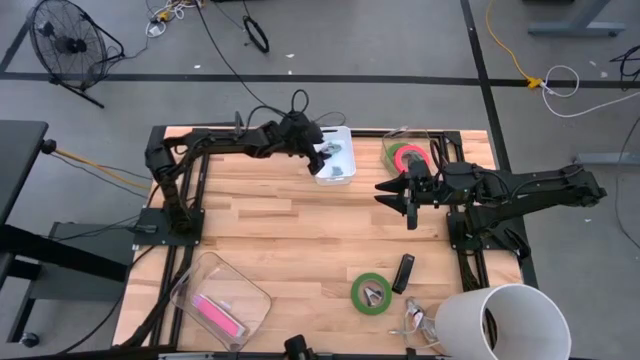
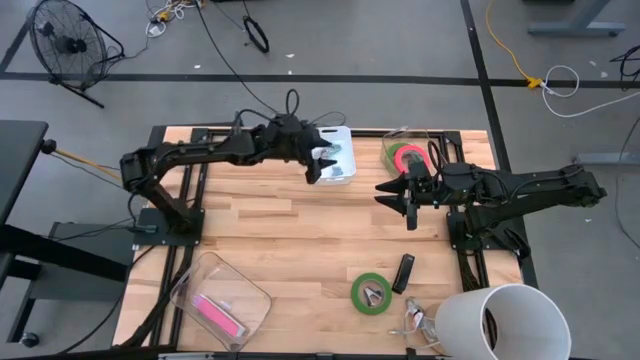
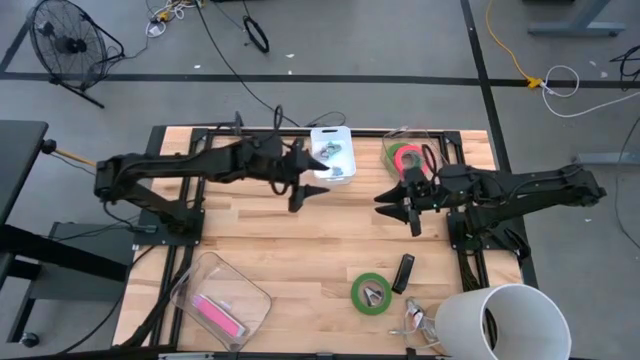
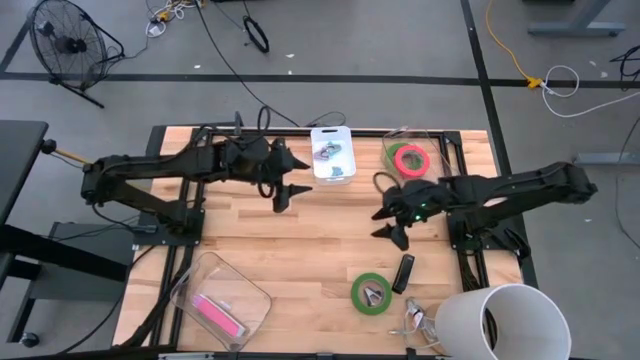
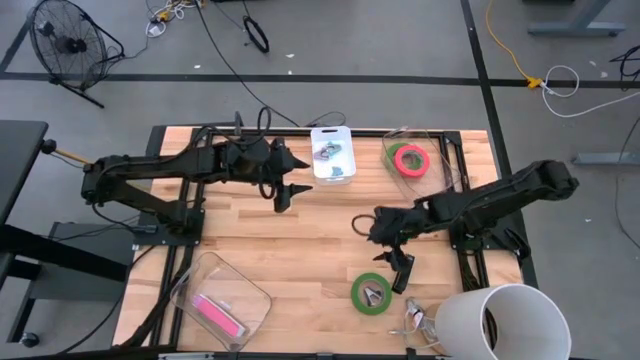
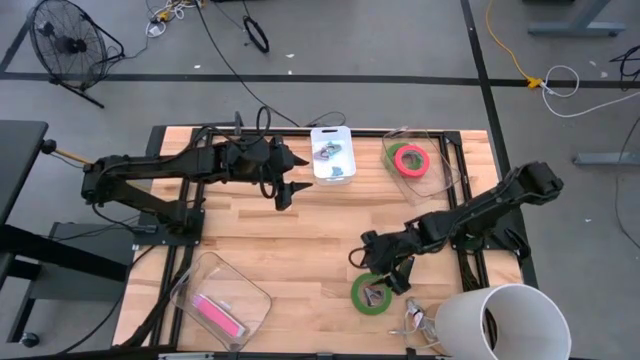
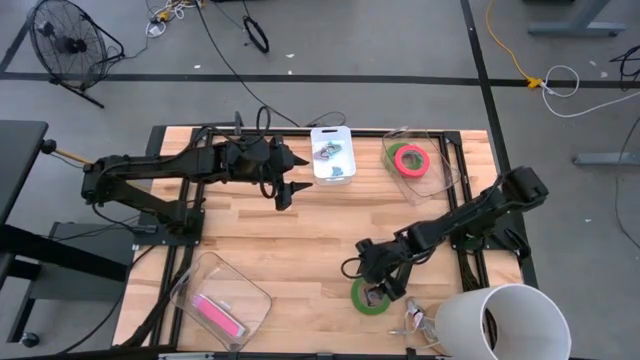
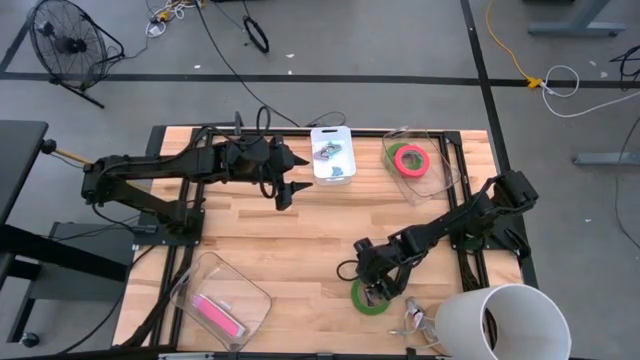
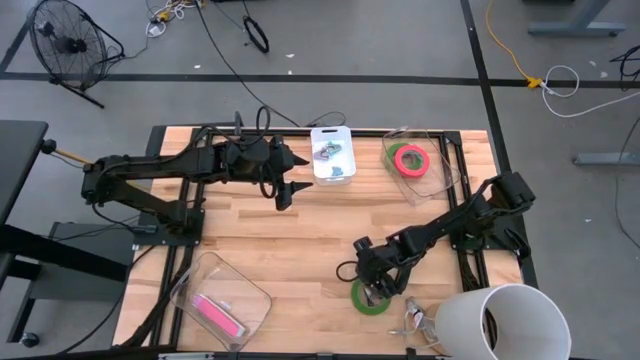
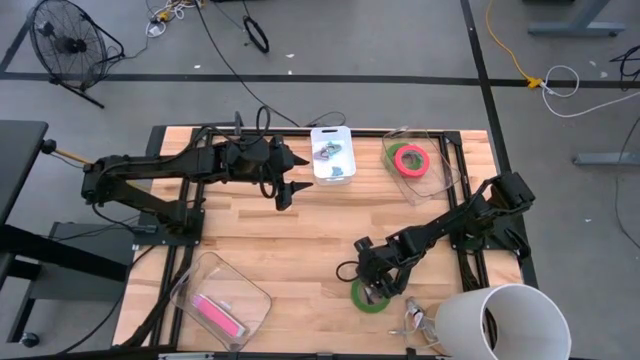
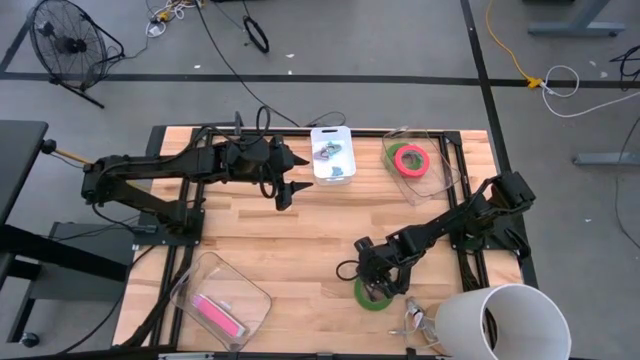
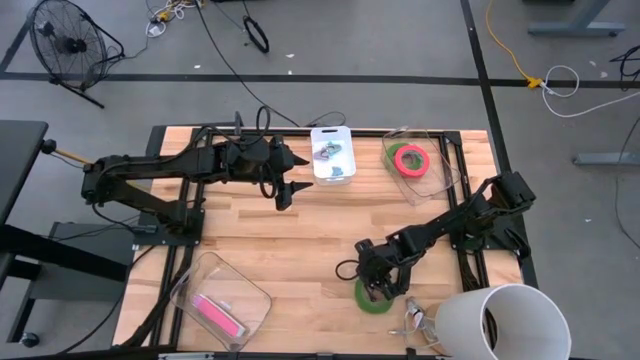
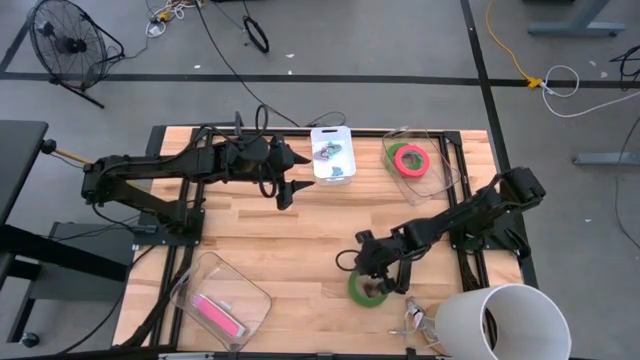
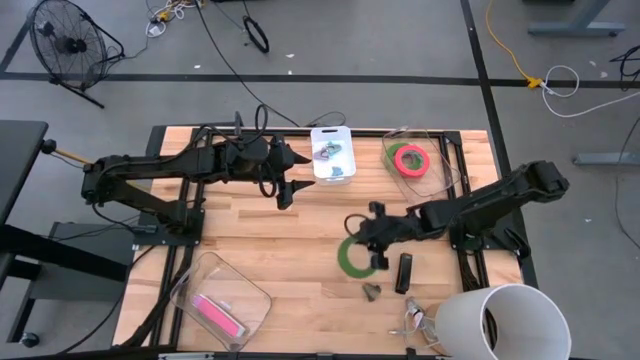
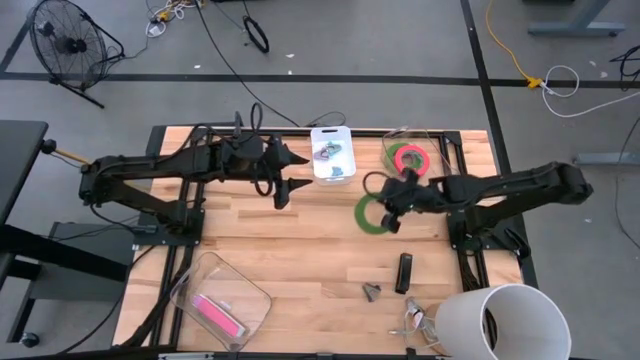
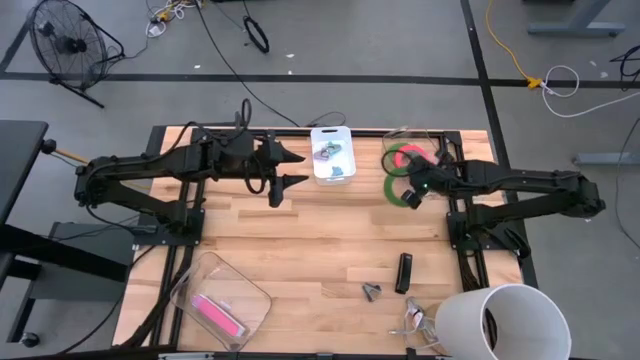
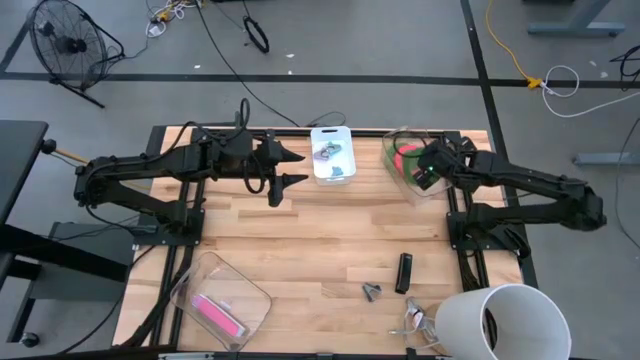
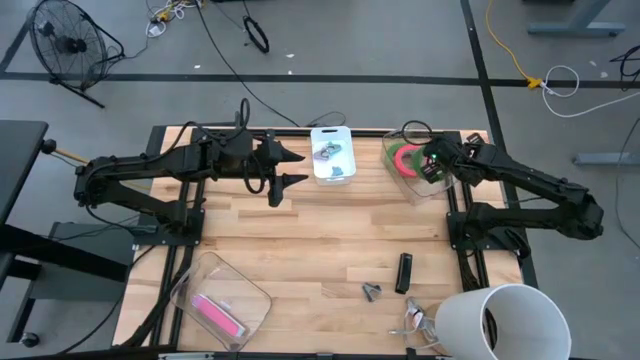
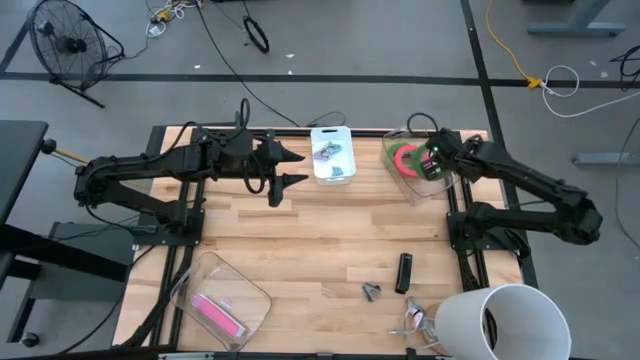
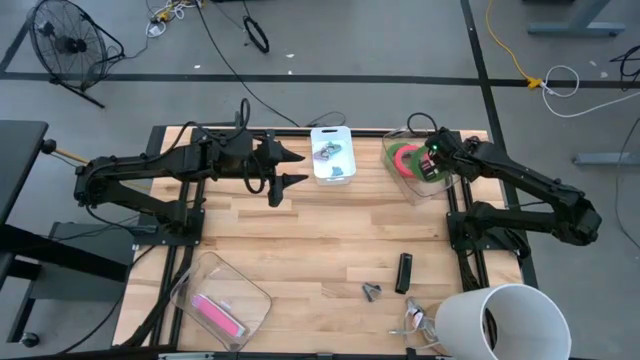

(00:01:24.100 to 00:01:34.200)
Task: Pick and place Stapler, Stapler remover, tape
Put the green tape into the top transparent bin

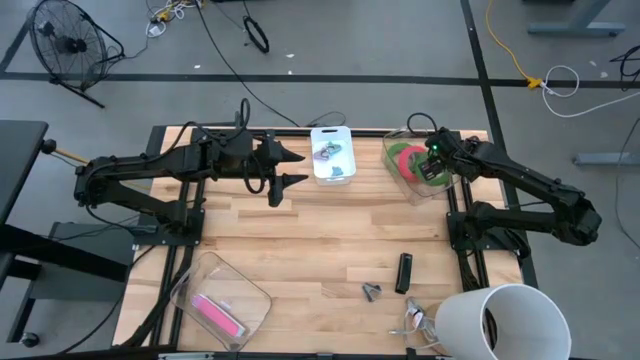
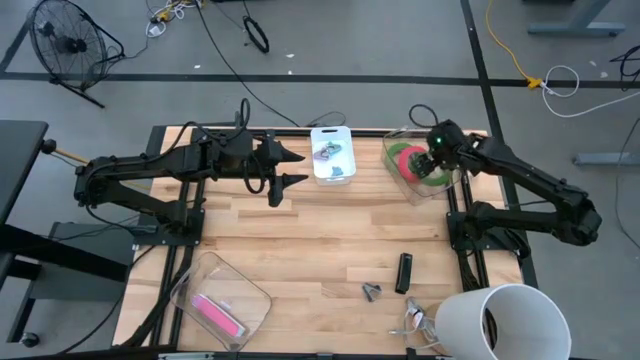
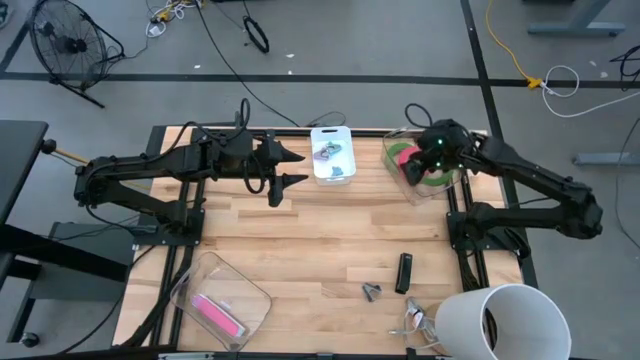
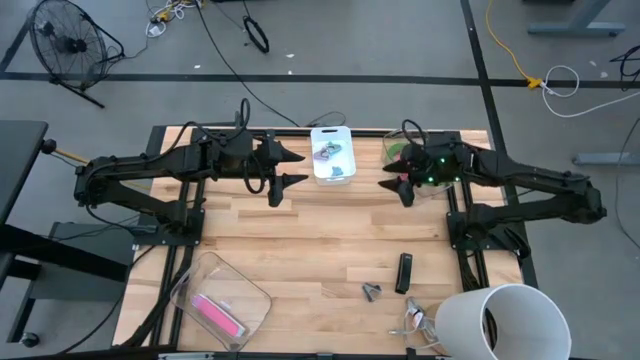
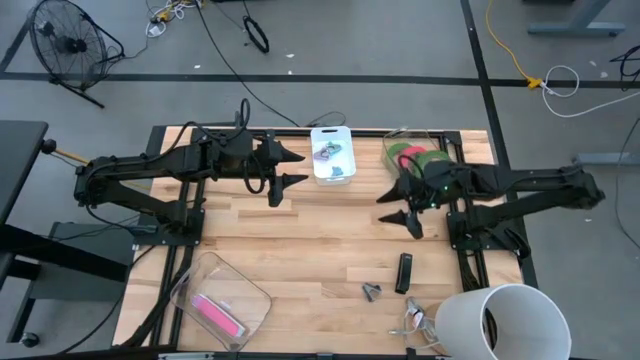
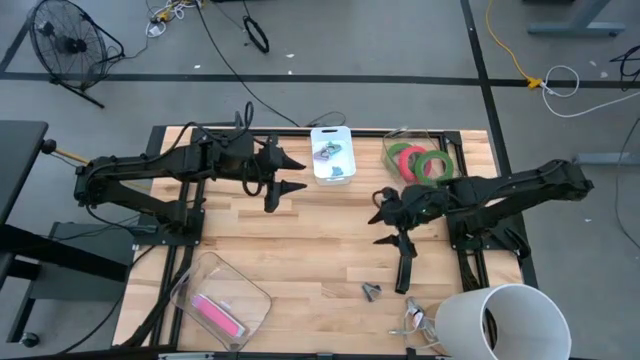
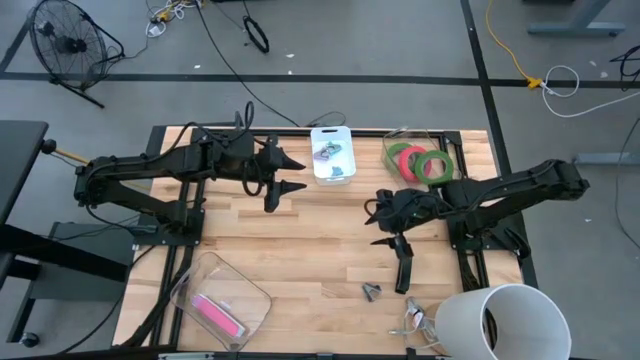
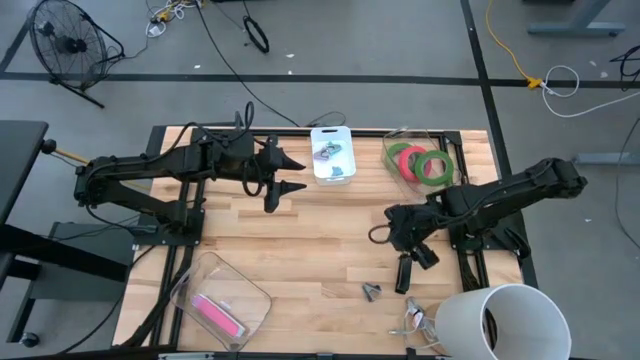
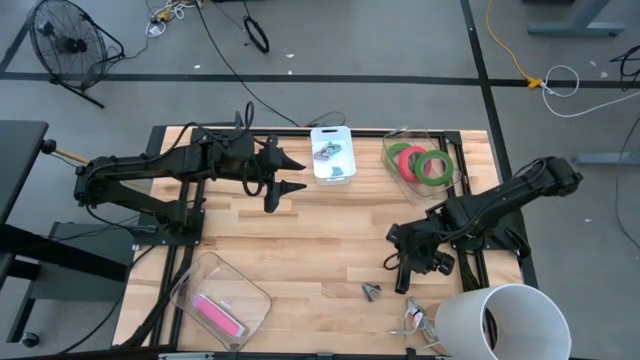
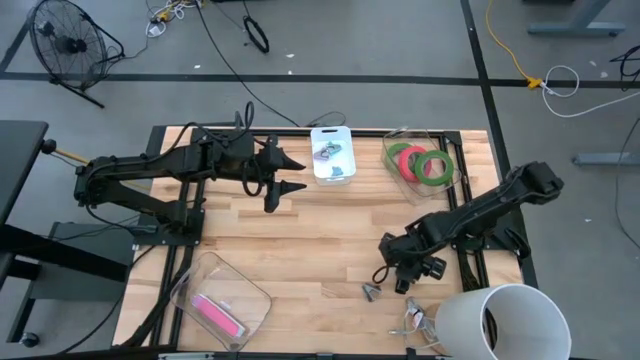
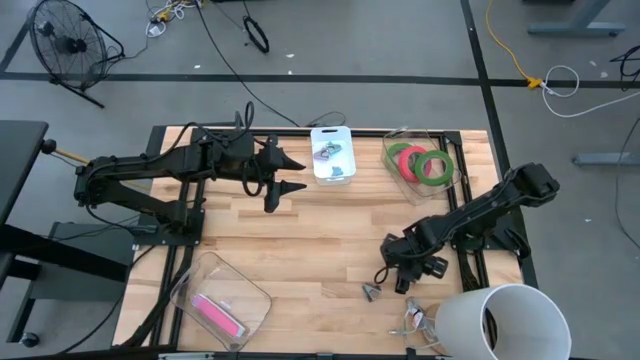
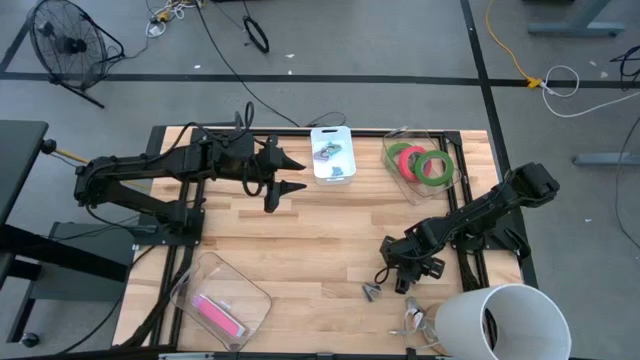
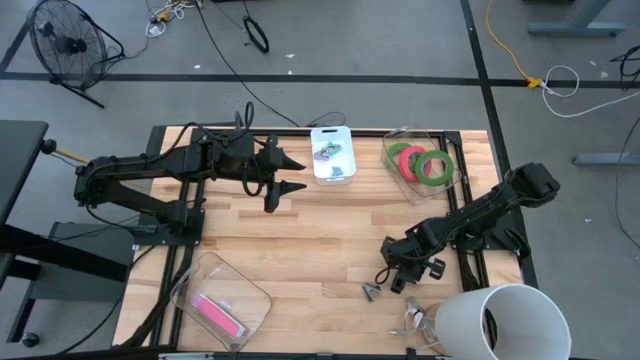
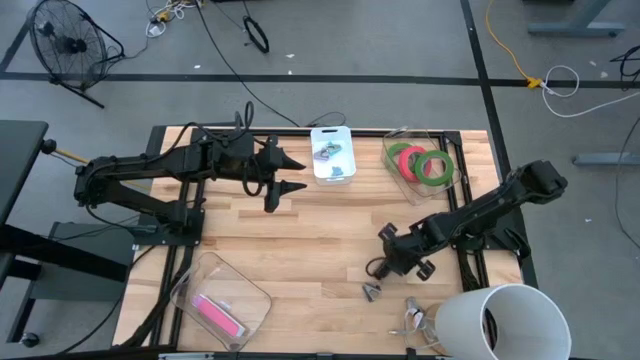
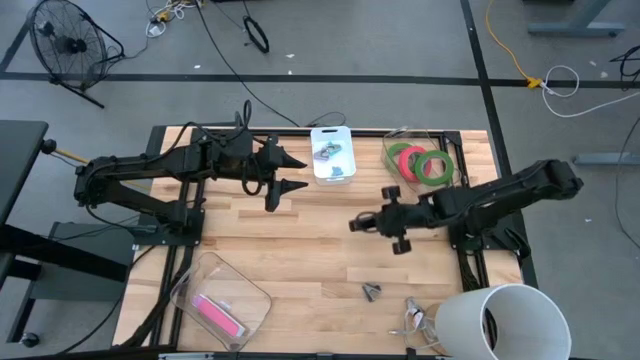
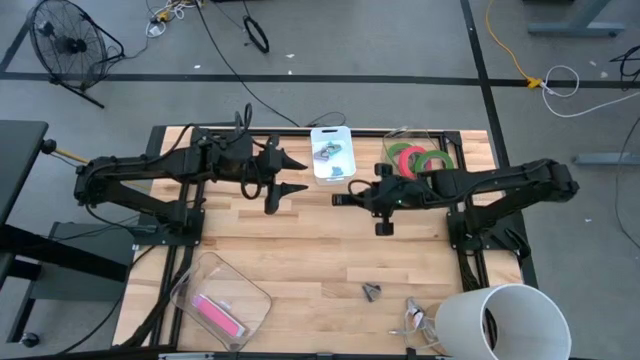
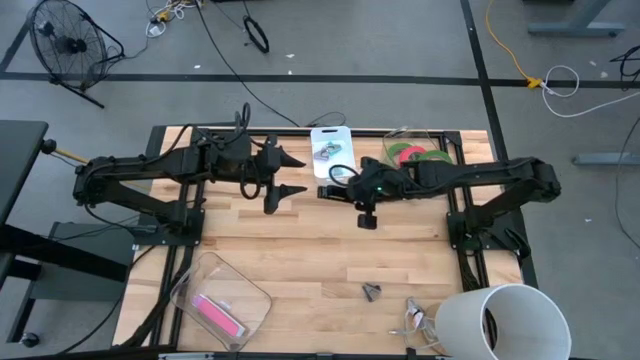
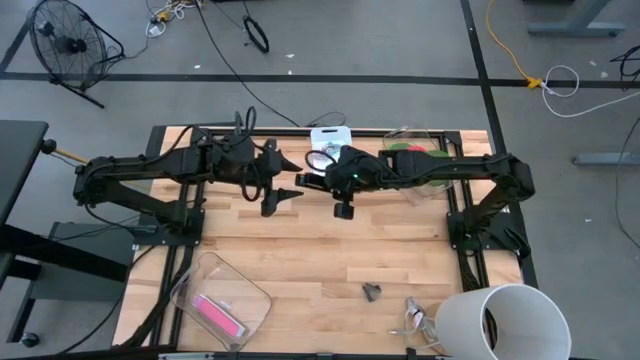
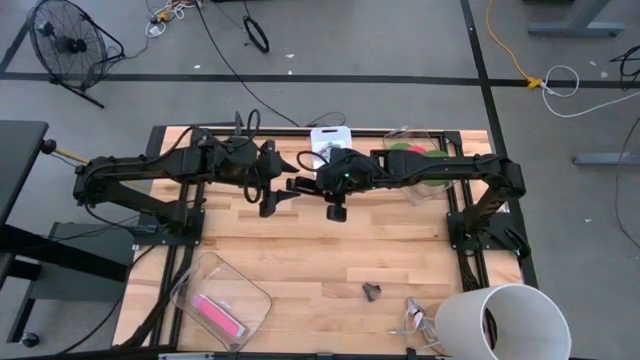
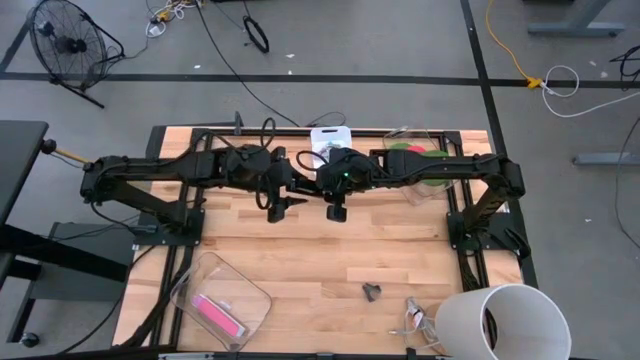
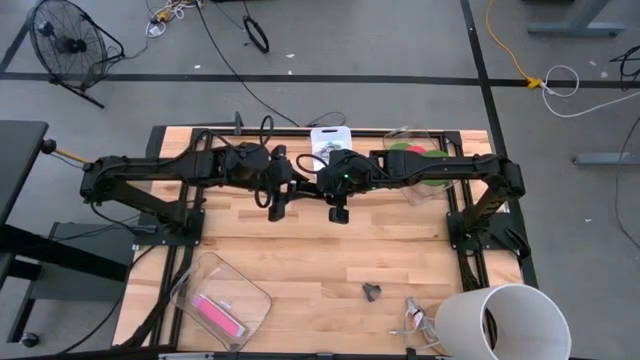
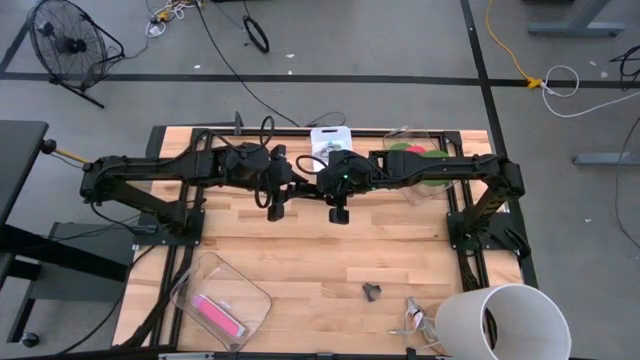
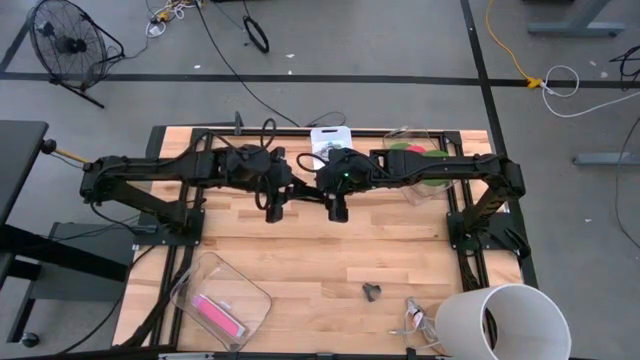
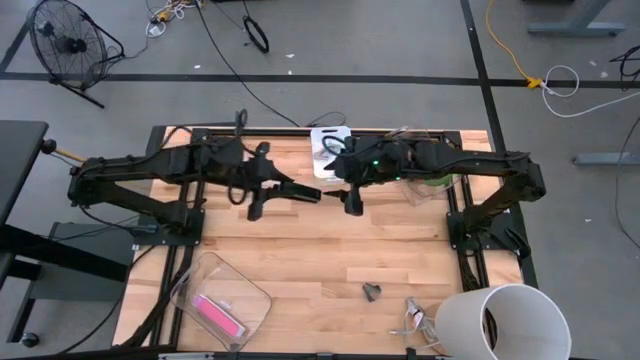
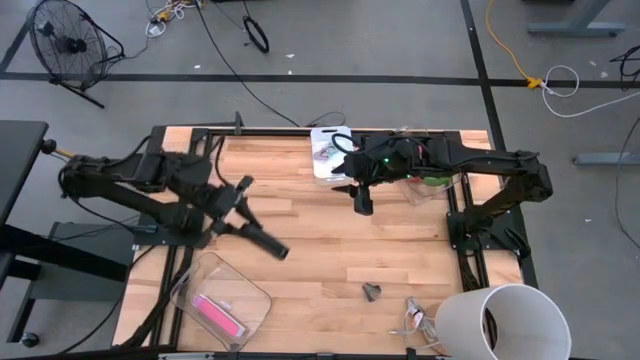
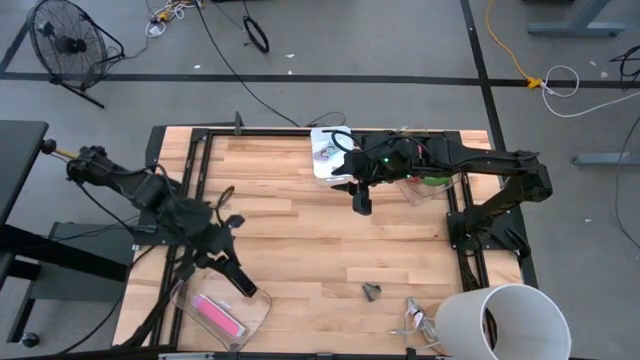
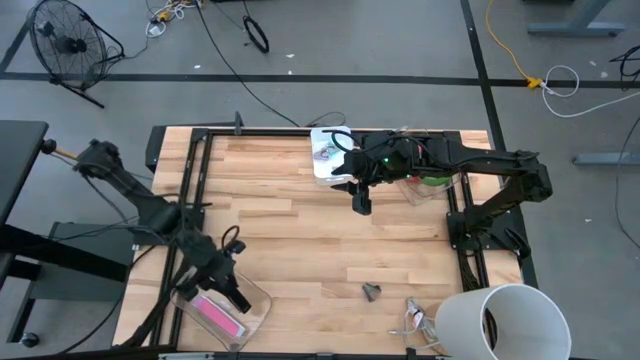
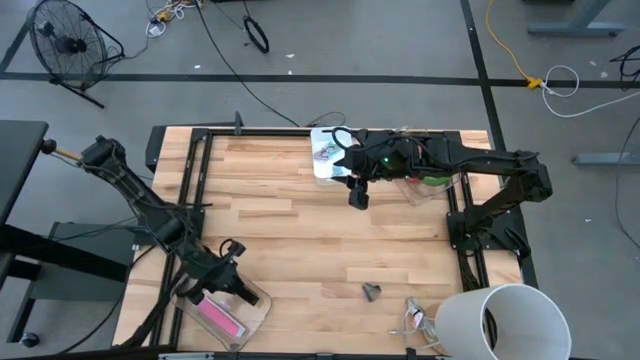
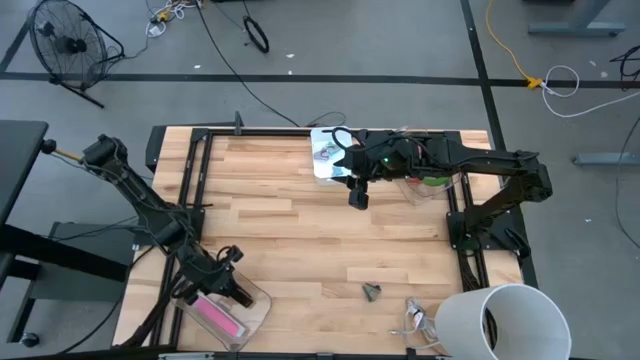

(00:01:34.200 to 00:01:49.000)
Put the black stapler into the bottom transparent bin
